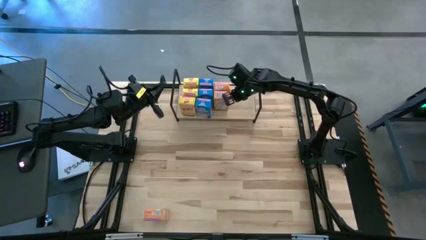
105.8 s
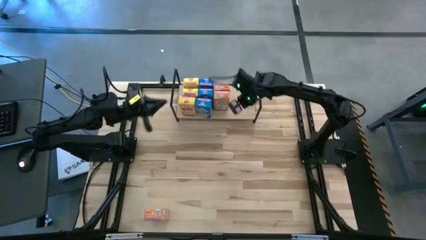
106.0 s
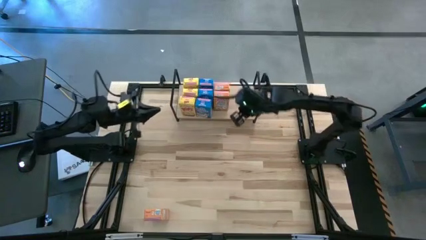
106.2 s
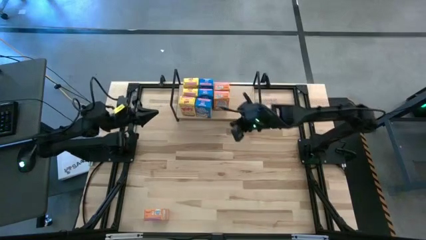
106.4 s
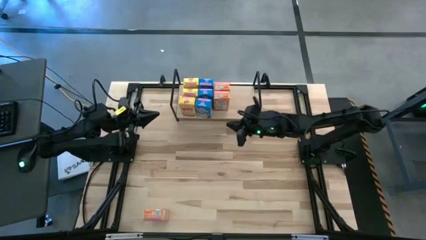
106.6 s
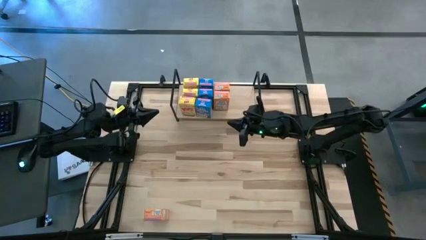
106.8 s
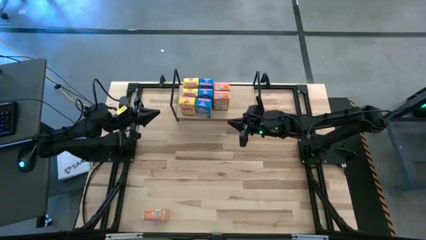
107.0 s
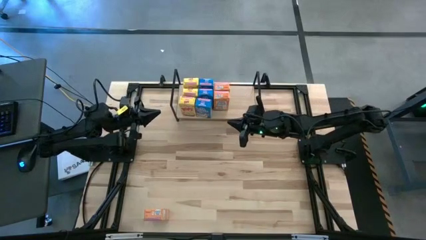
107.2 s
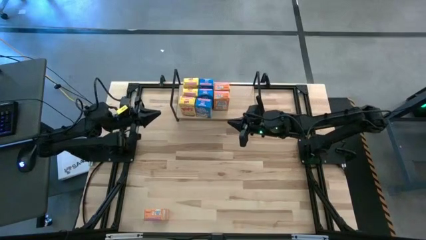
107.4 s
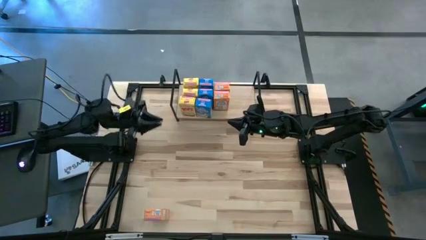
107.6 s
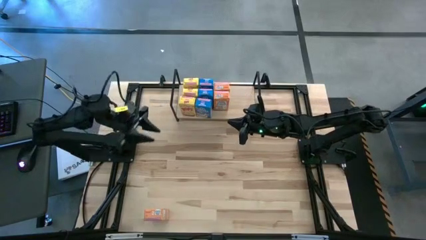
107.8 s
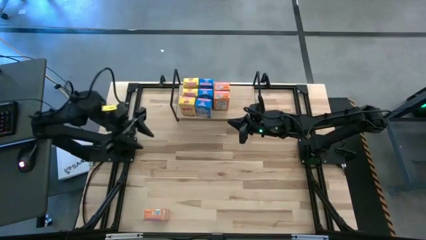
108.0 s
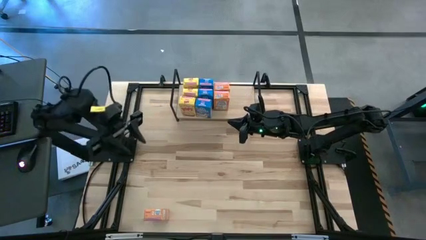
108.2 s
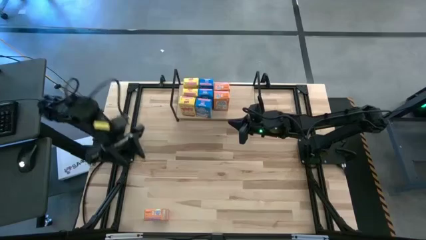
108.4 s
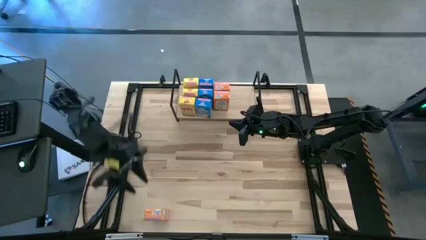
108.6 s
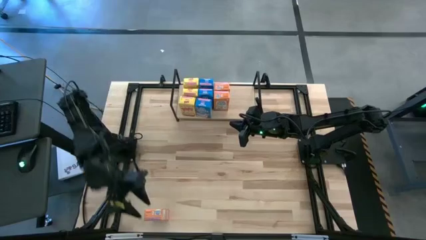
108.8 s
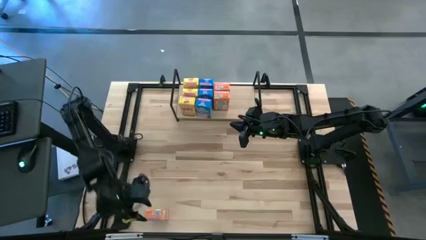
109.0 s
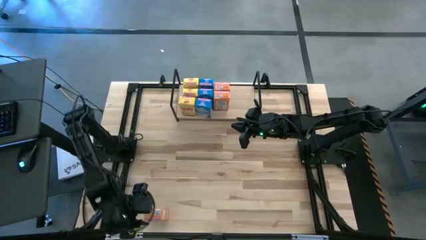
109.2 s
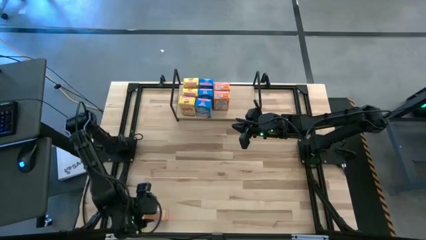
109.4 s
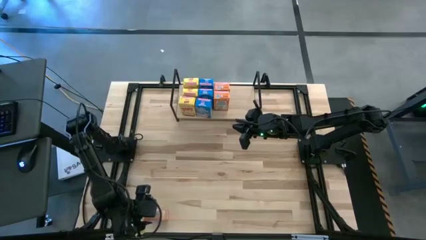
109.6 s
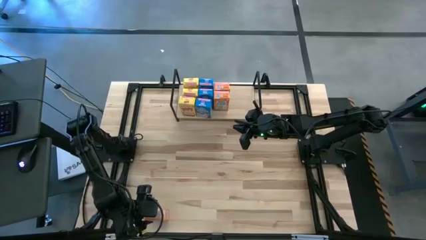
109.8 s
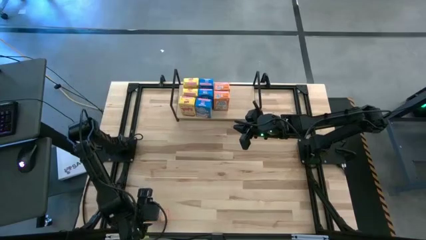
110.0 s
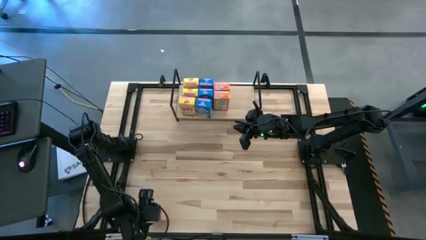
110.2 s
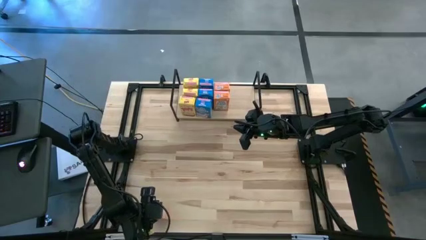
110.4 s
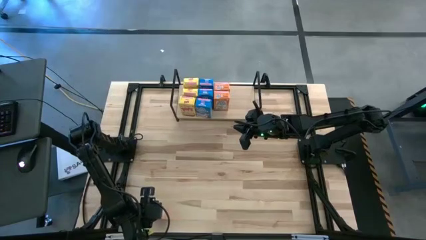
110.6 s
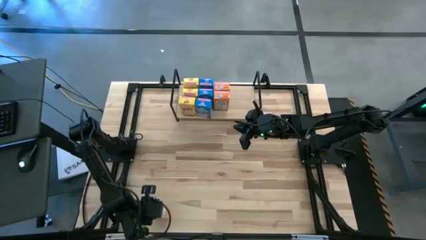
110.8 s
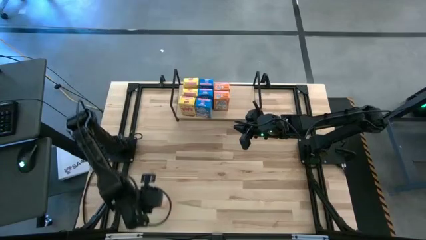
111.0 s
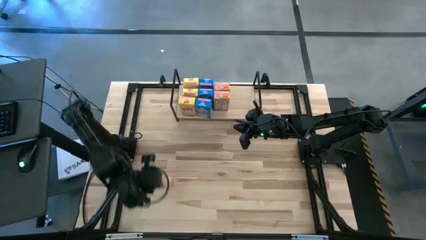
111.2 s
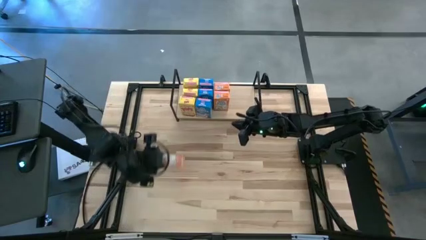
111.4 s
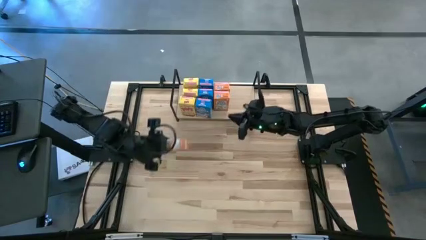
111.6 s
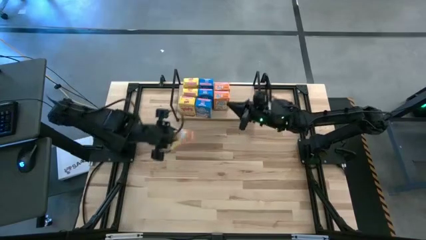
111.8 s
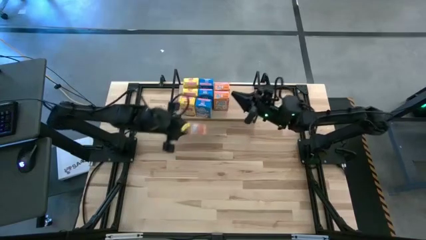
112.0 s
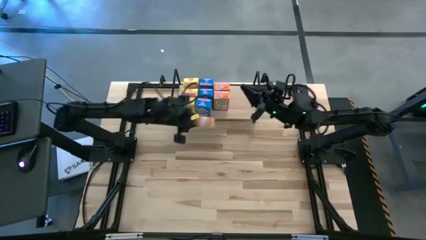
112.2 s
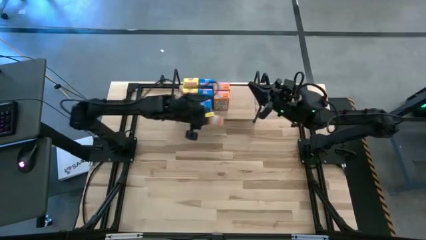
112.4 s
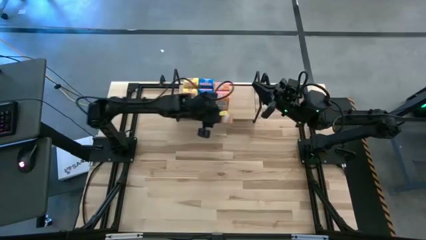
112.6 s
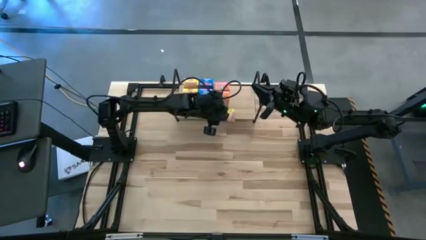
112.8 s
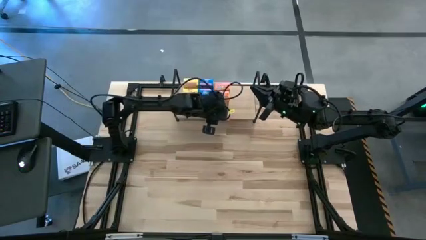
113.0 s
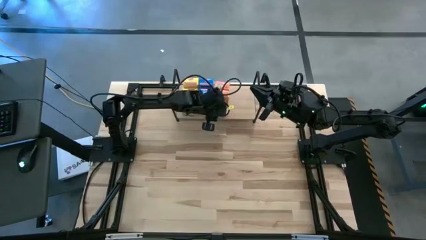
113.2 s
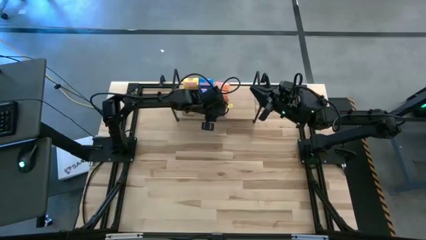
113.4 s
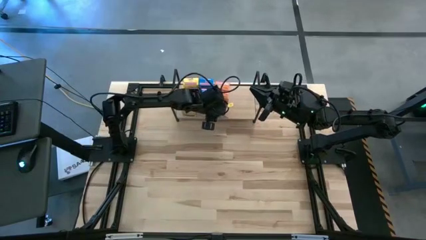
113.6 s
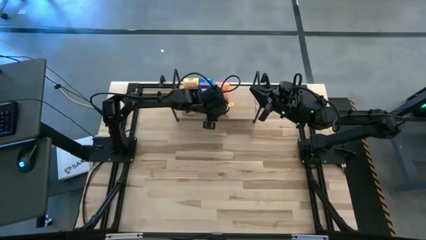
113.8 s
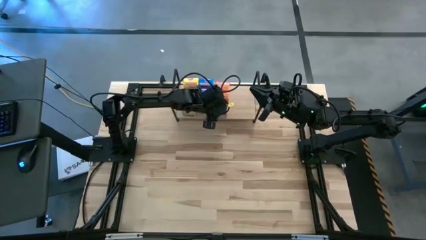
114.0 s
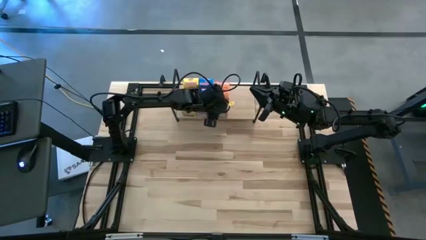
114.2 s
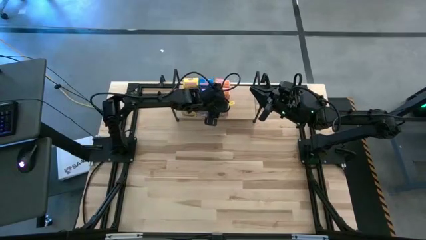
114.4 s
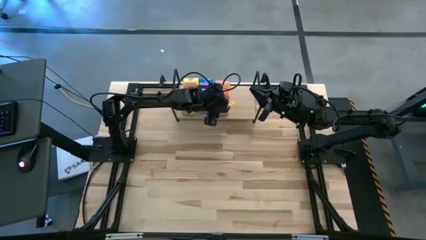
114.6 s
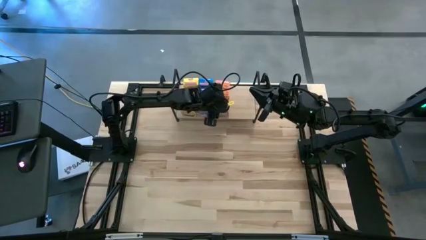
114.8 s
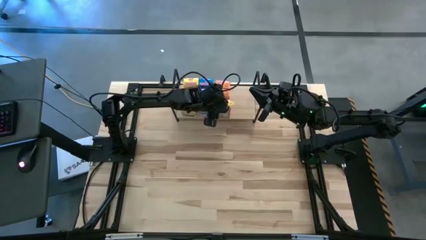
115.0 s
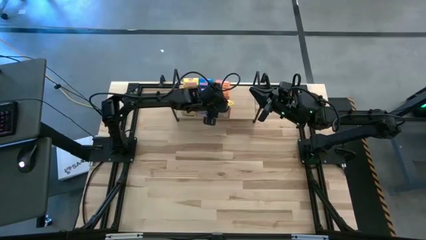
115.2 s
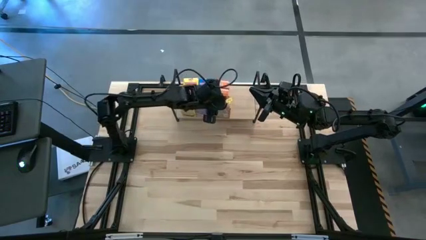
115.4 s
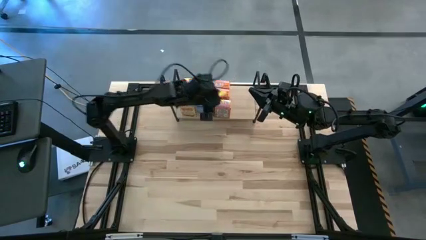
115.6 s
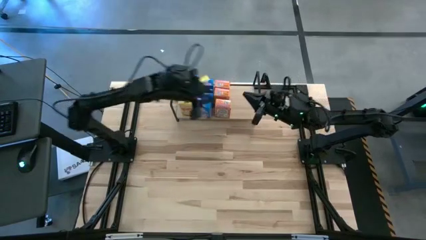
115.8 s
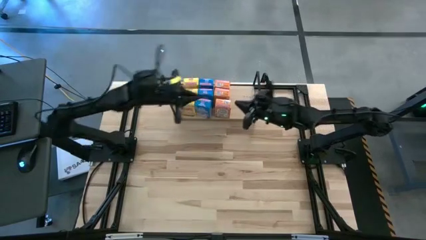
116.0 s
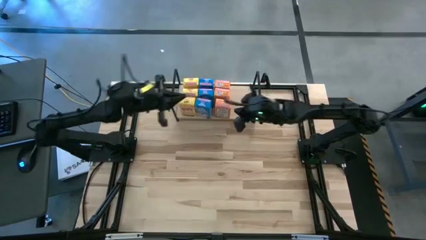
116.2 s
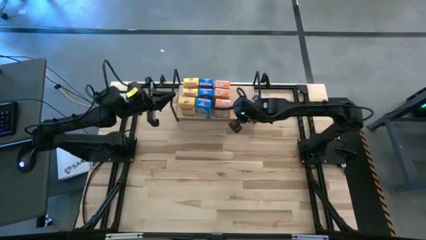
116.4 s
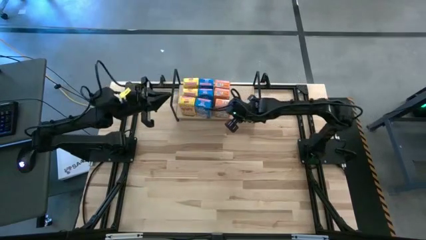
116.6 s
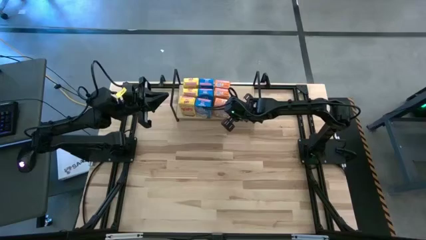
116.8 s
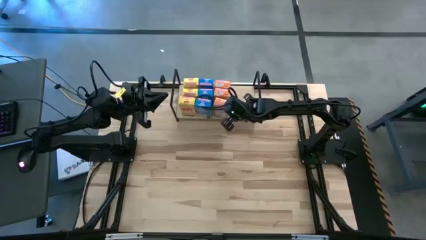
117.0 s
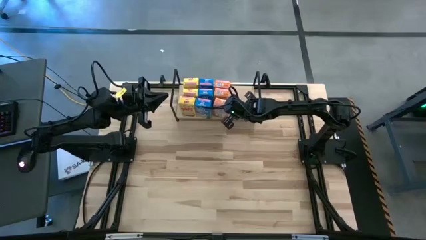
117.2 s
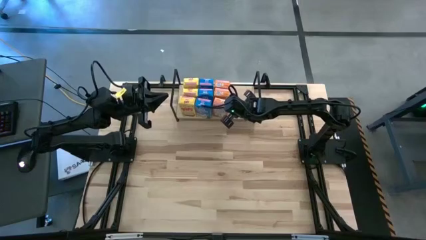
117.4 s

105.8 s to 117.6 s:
Task: Stack cereal on shelf
Put the orange cereal box on the shelf aligned with the other orange cereal boxes

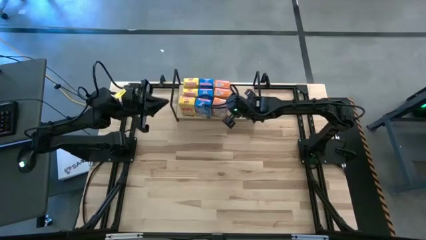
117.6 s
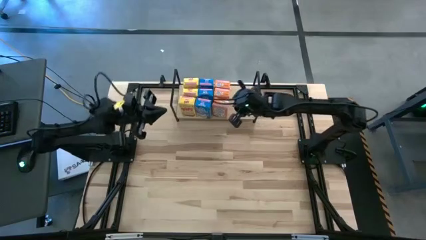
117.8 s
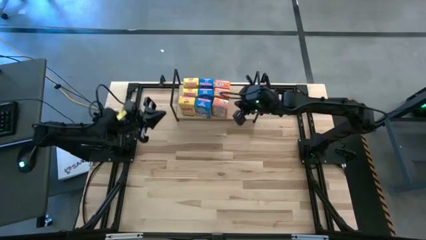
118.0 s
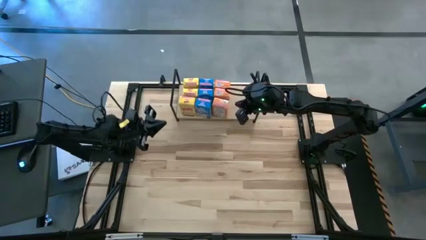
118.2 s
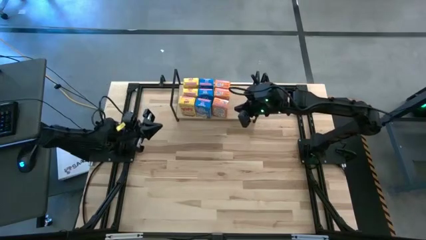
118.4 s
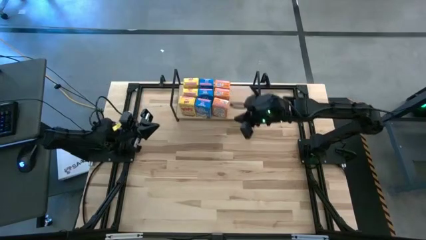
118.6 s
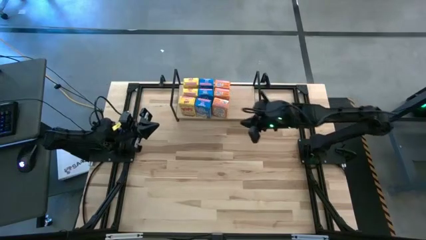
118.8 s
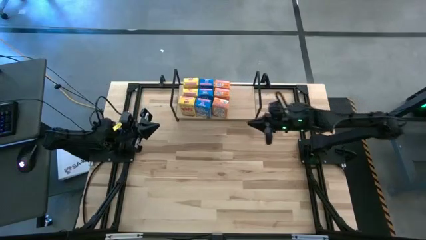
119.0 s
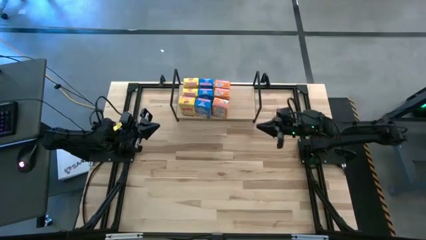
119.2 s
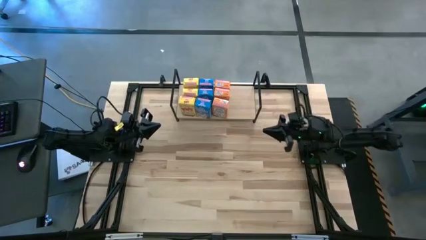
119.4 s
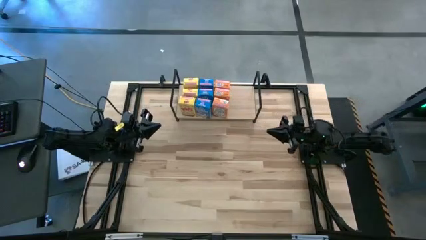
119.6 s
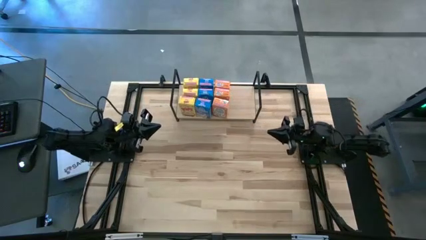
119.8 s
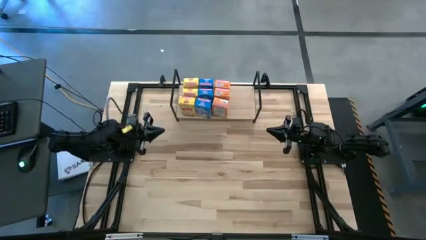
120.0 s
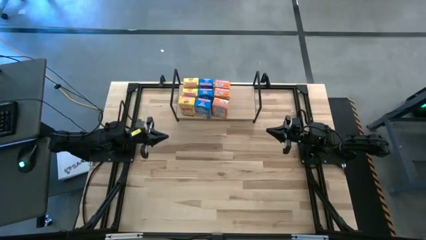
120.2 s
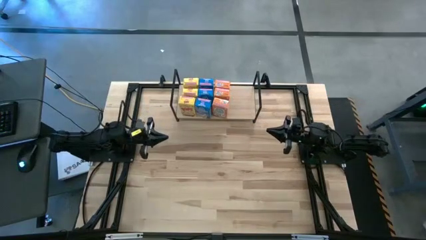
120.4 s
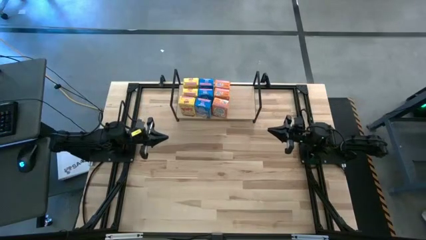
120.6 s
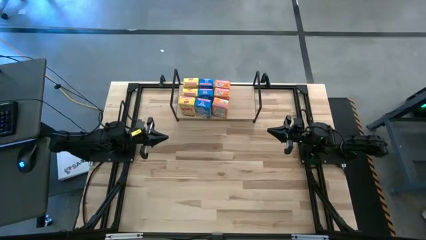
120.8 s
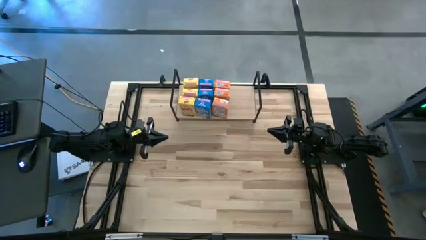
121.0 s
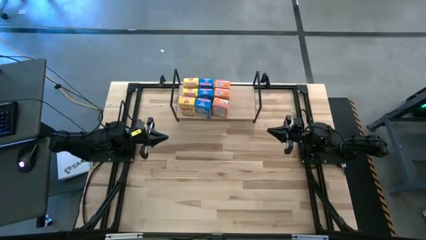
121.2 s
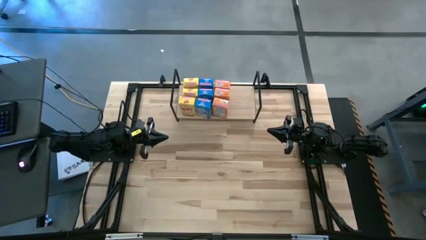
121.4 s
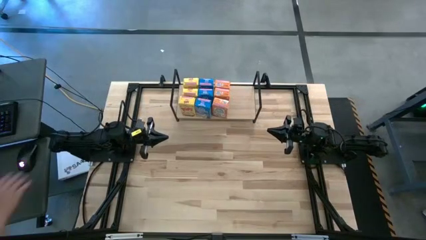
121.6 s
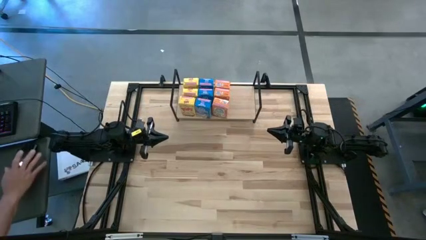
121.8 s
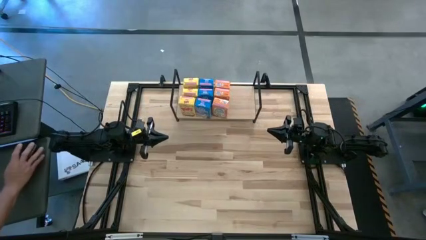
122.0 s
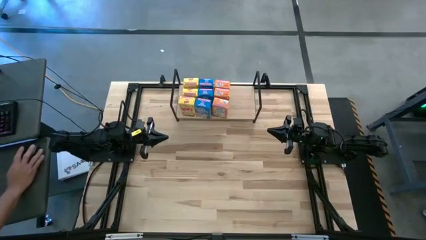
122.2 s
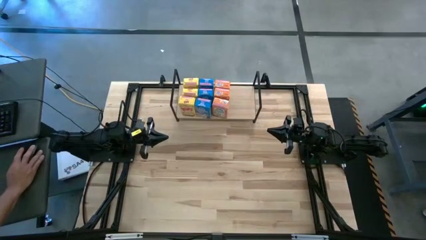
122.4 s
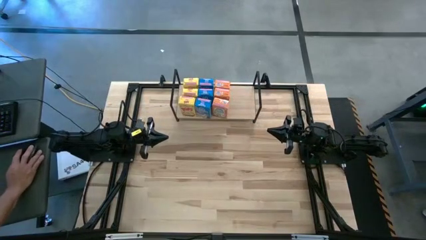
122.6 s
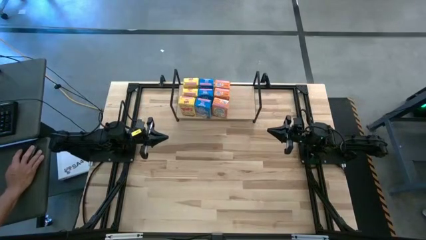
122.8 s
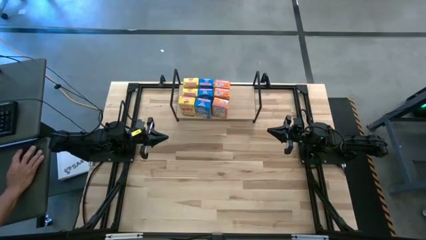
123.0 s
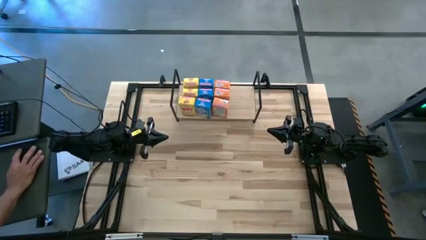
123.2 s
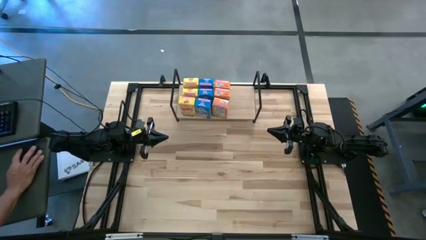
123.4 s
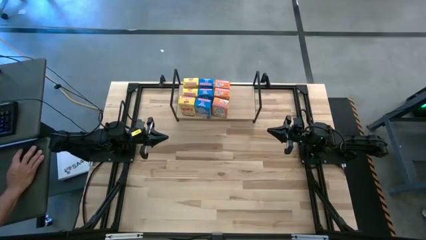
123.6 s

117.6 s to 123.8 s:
Return to Home Position
